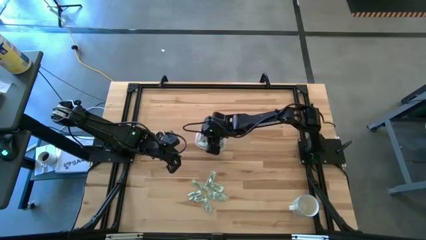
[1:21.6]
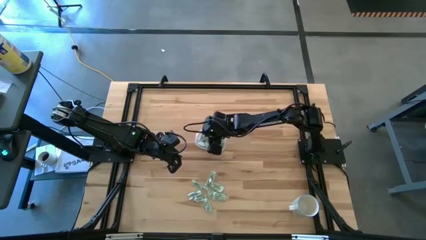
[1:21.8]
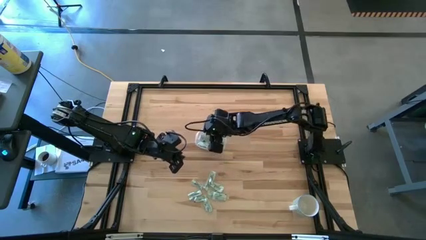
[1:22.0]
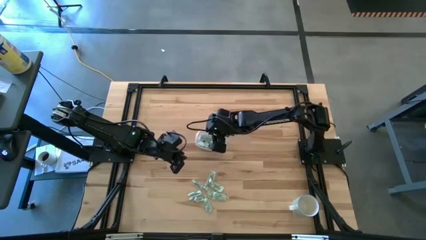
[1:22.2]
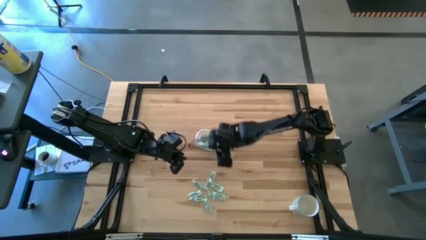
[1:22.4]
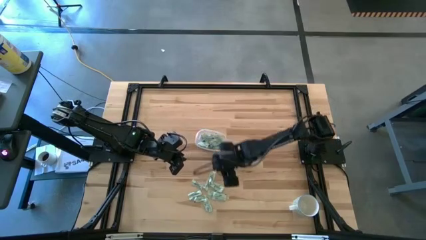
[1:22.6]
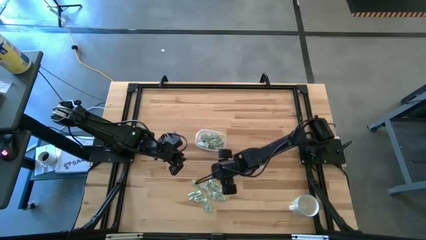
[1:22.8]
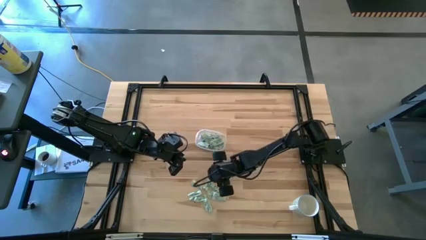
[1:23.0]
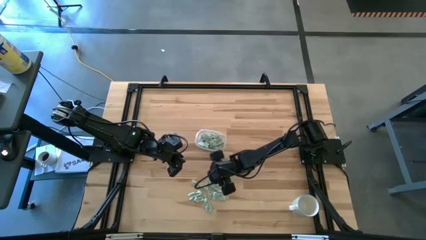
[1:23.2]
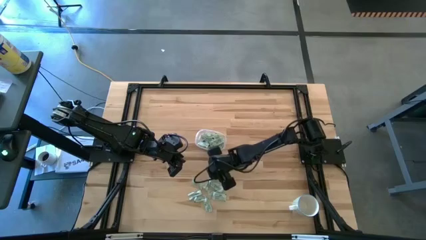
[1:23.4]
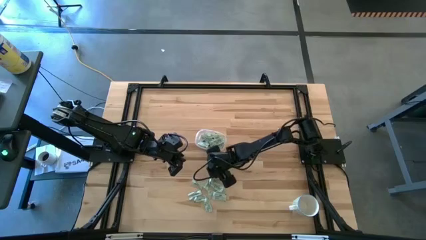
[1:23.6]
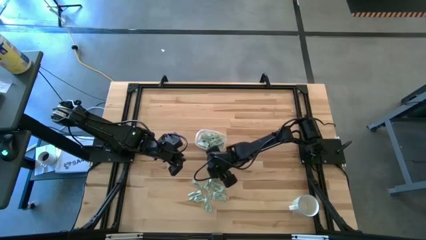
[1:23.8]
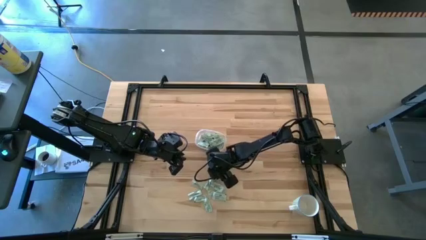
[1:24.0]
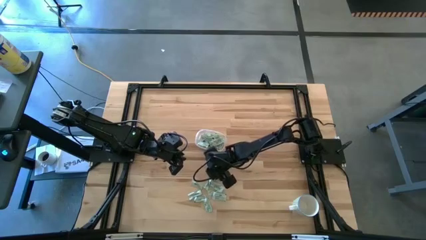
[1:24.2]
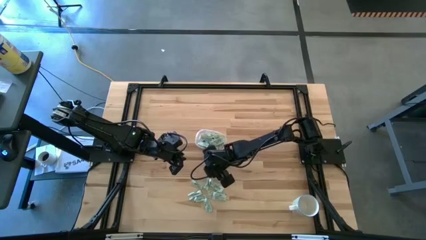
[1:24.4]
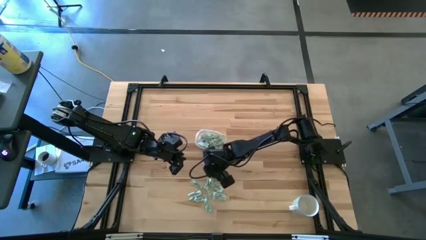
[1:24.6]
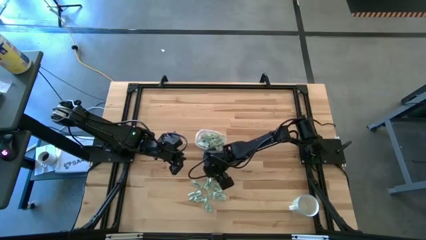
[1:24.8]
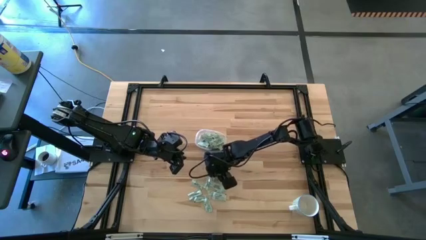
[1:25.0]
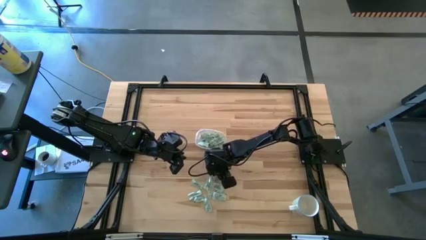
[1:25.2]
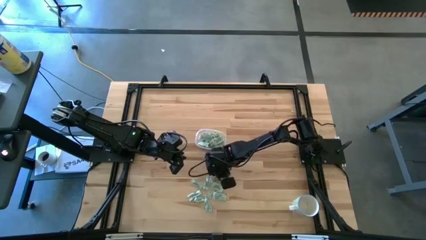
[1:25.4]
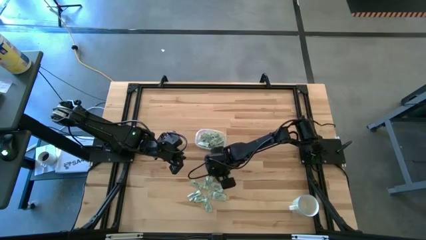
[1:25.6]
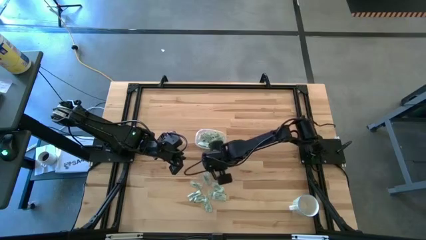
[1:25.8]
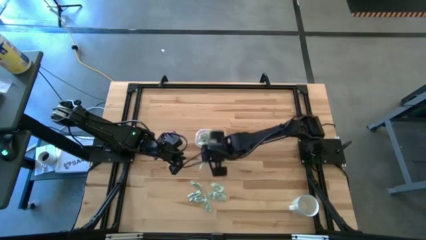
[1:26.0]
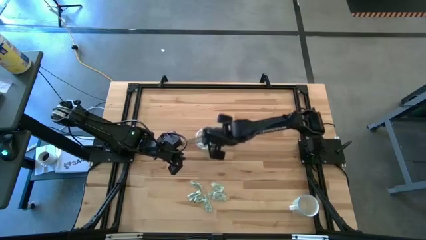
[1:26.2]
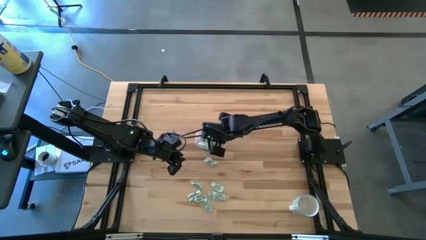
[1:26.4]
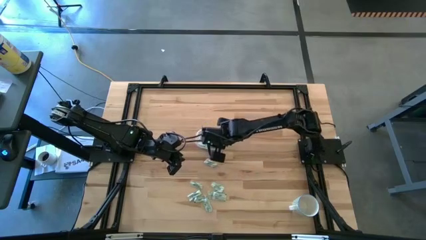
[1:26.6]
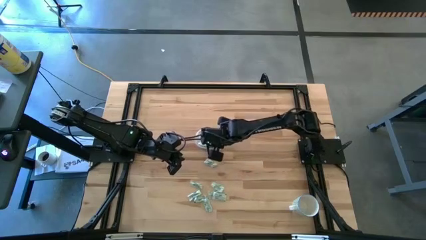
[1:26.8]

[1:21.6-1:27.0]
Task: Pick and place Stevia / Truvia into bins
Put the stevia packet into the transparent container

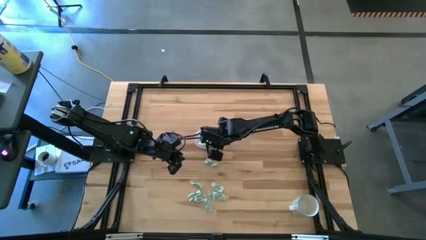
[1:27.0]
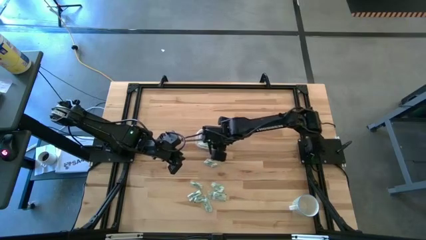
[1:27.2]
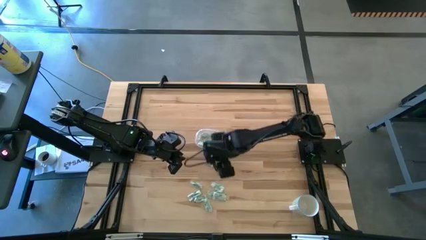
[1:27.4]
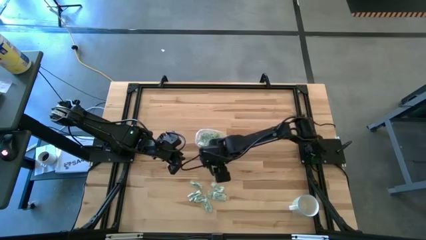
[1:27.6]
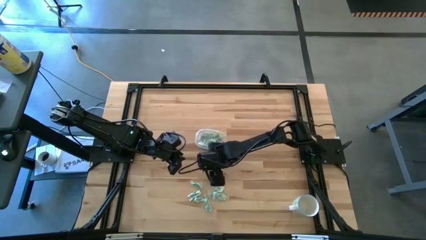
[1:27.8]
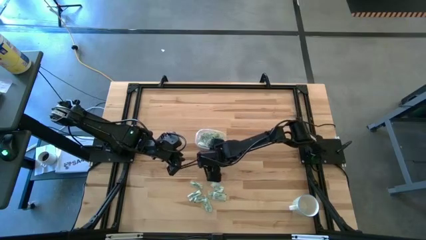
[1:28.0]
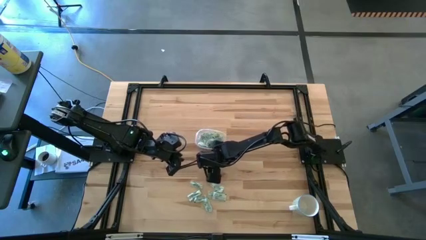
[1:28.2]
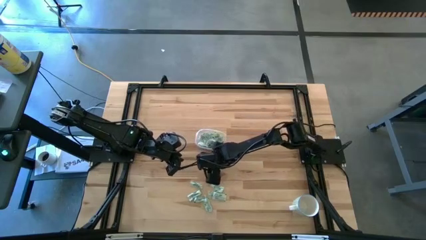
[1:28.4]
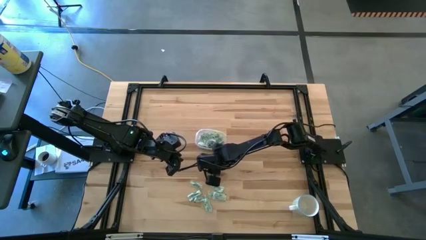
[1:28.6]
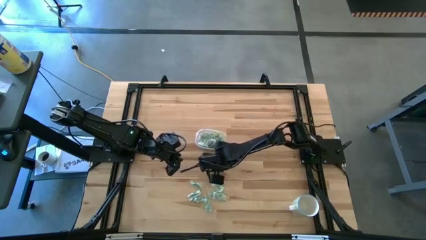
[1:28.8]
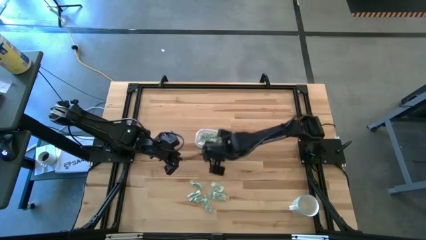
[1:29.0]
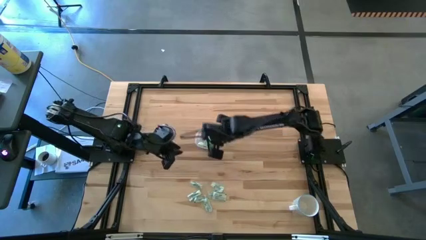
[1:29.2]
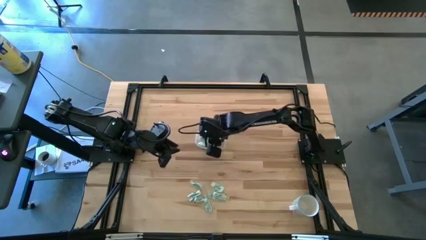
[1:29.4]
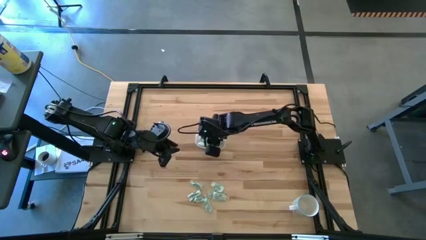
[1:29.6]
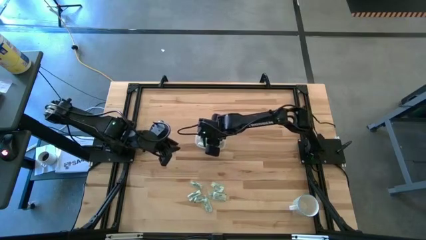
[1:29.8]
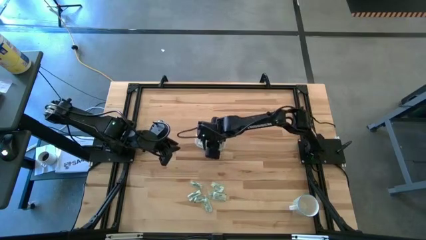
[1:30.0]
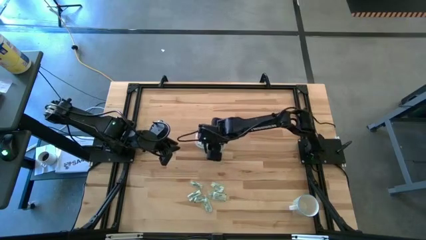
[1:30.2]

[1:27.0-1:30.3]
Put the stevia packet into the transparent container

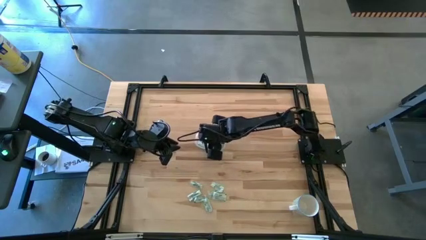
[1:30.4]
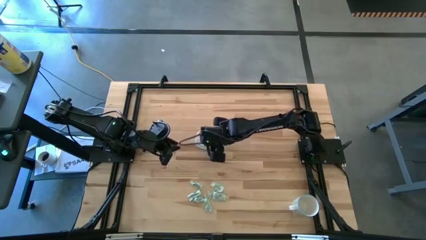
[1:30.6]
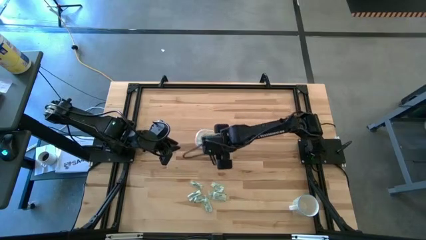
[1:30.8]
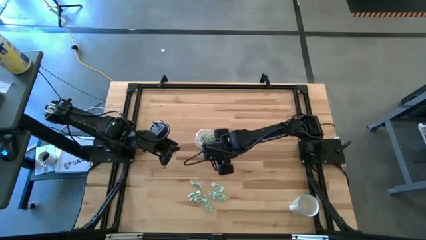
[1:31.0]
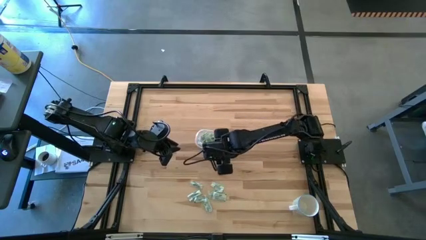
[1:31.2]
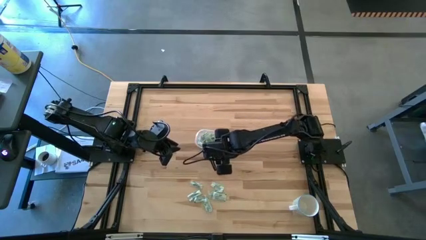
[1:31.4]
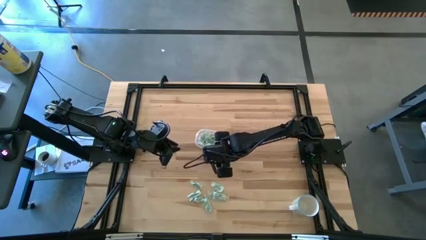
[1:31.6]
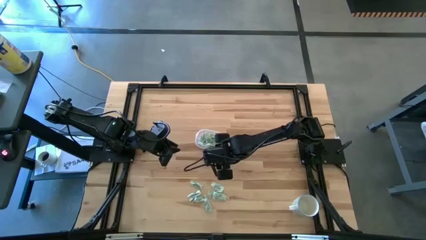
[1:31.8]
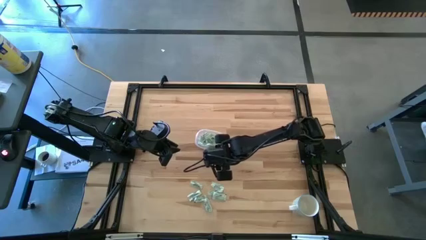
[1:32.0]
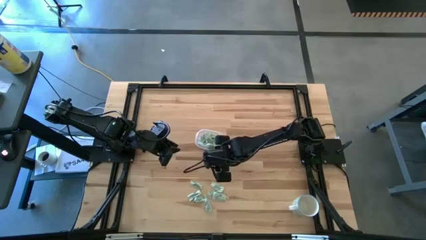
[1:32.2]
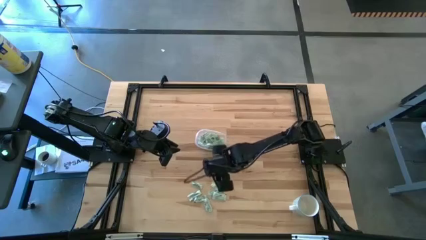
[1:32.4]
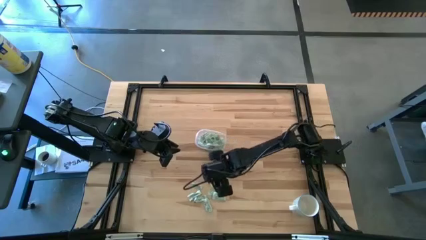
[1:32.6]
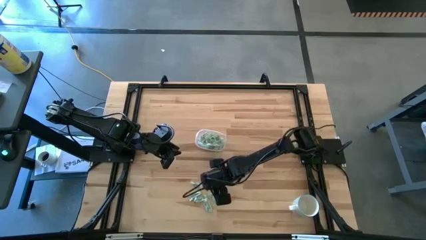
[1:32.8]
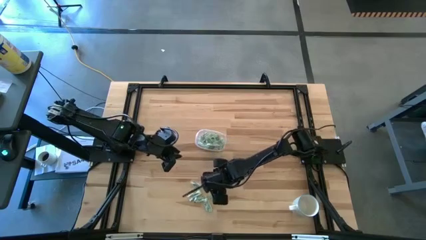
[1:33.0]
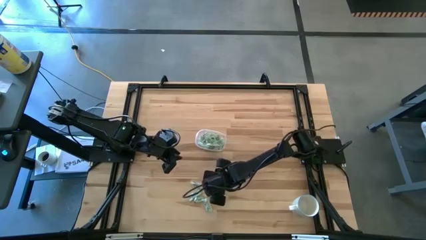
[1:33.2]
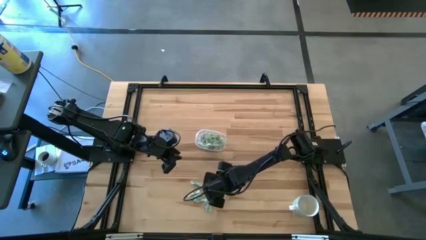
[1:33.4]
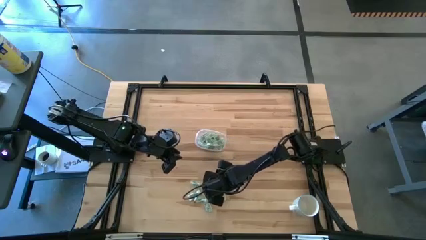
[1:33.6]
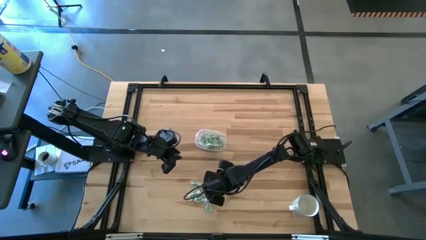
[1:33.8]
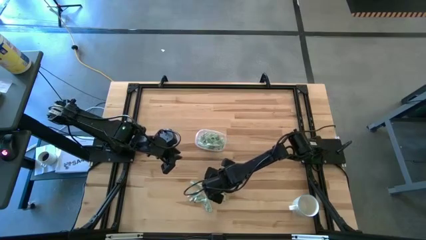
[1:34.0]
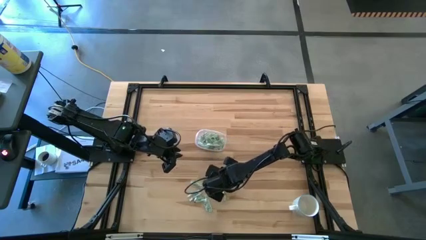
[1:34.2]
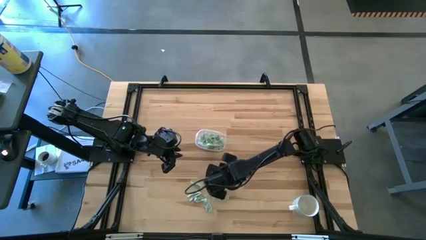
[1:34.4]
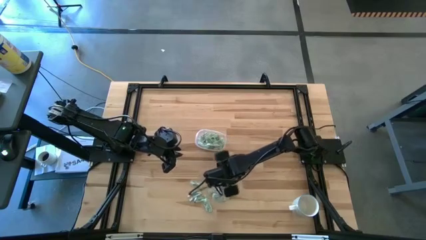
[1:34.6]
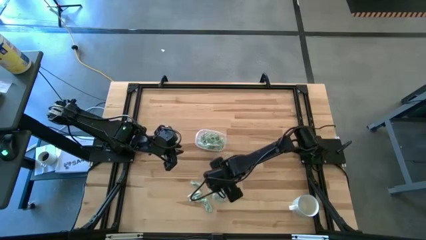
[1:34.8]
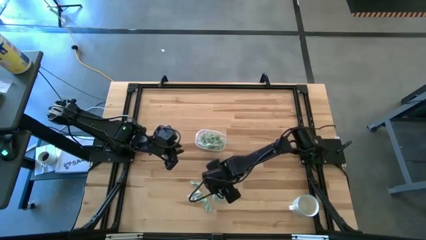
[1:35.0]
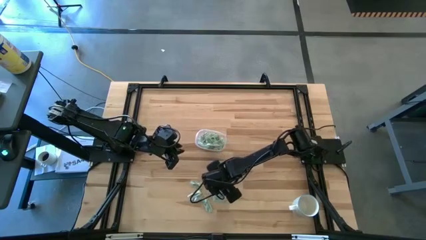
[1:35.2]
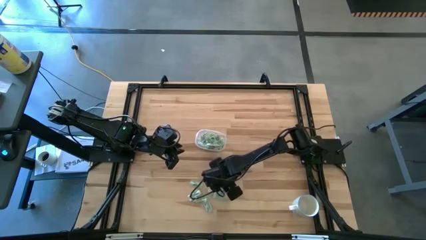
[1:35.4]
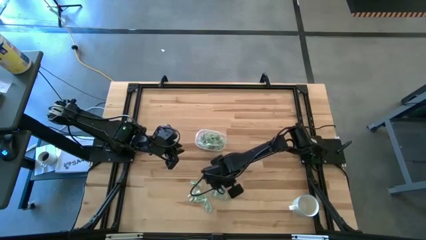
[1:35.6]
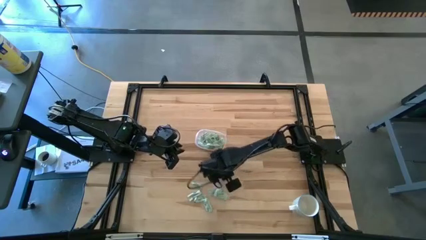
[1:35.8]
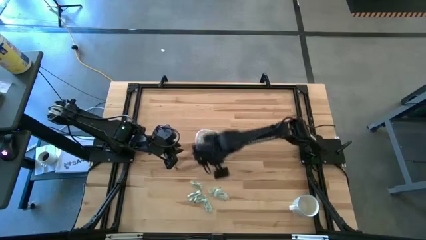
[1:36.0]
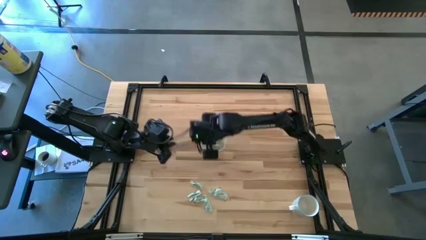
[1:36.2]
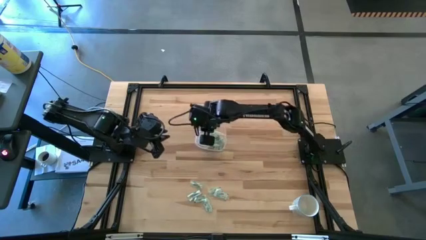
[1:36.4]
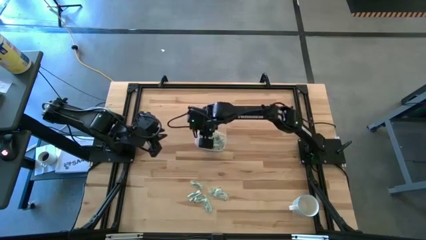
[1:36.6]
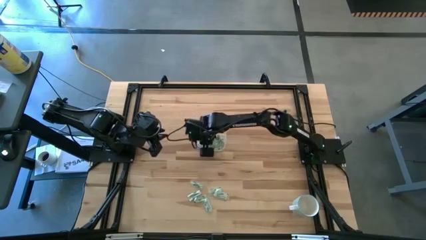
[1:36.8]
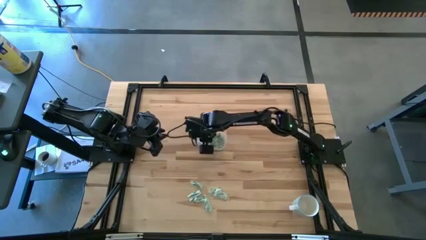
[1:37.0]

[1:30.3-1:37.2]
Put the stevia packet into the transparent container

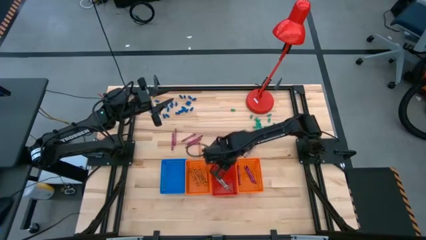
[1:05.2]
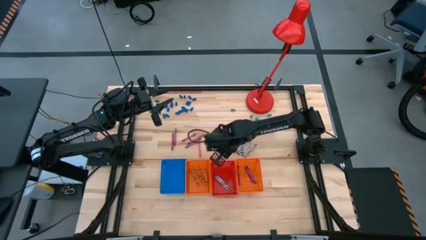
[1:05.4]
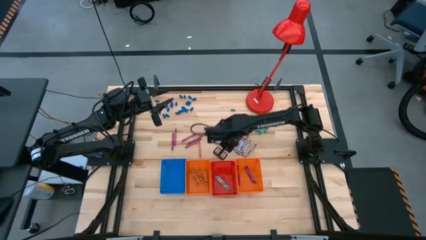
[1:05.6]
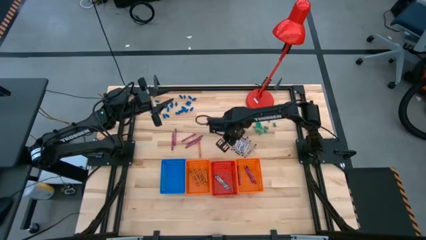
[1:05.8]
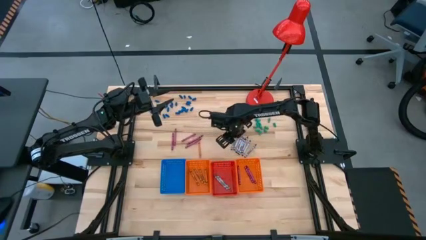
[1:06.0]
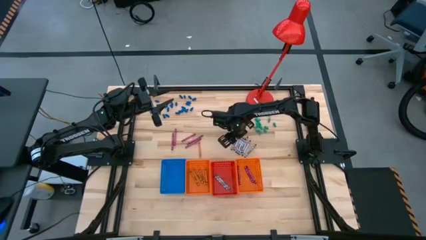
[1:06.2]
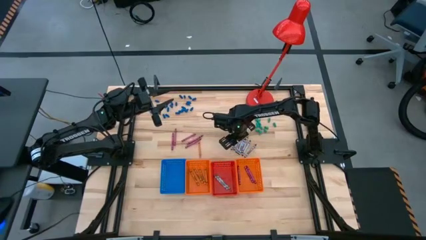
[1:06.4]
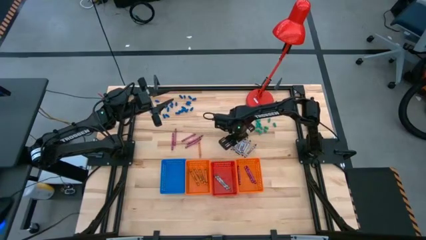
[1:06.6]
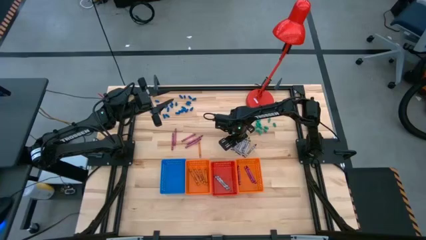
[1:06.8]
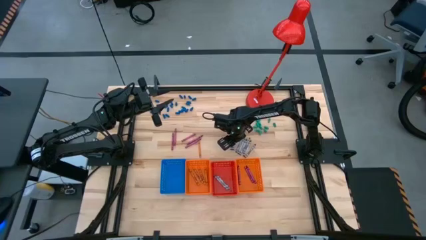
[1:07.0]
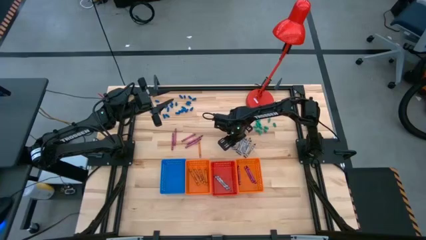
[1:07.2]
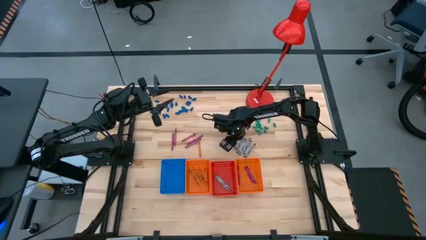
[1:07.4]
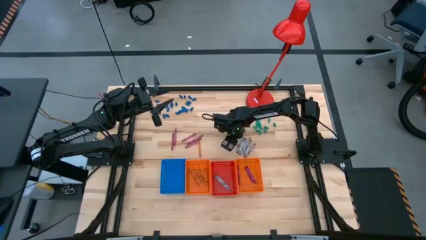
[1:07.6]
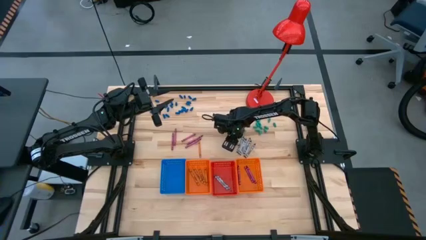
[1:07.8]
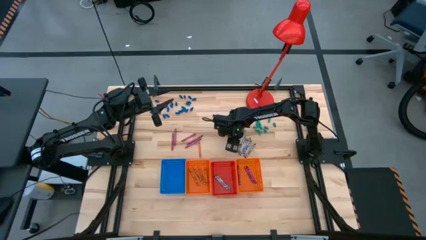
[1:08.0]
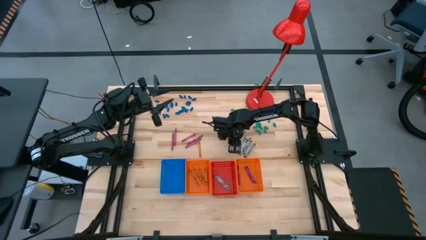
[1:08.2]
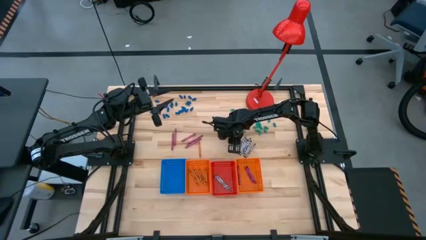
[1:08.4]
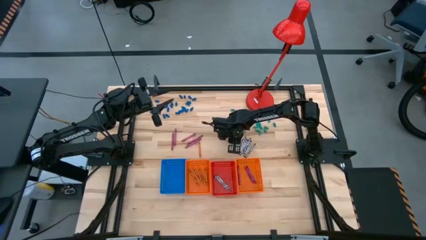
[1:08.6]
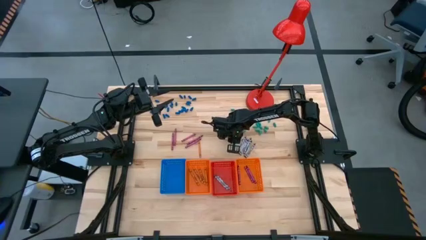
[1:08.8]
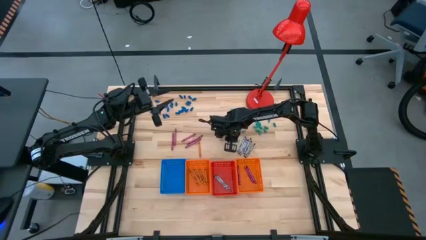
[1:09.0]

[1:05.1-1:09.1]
Task: Sort crayons
Put the black crayon into the blue bin
